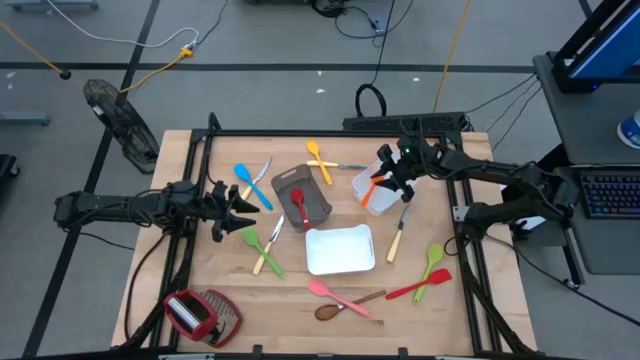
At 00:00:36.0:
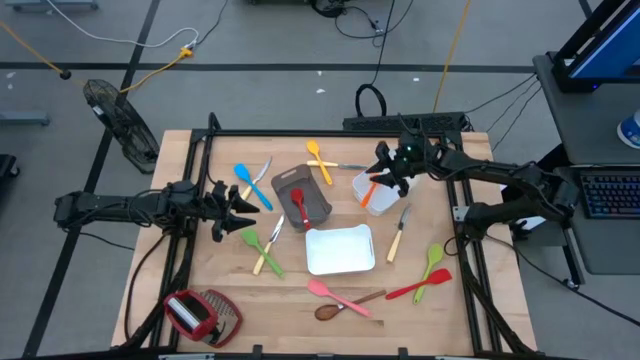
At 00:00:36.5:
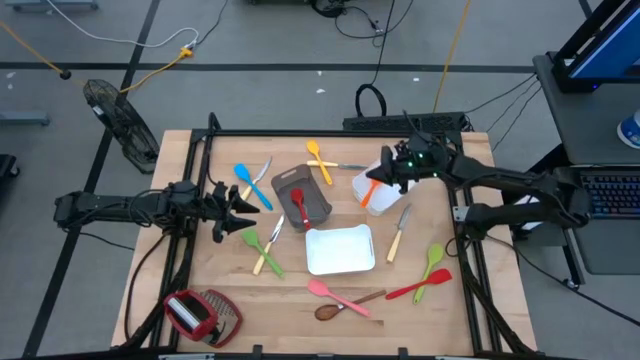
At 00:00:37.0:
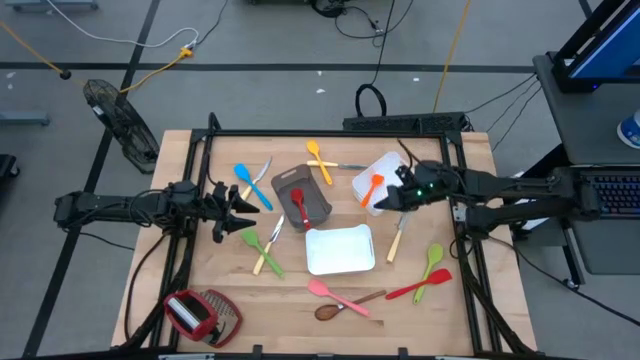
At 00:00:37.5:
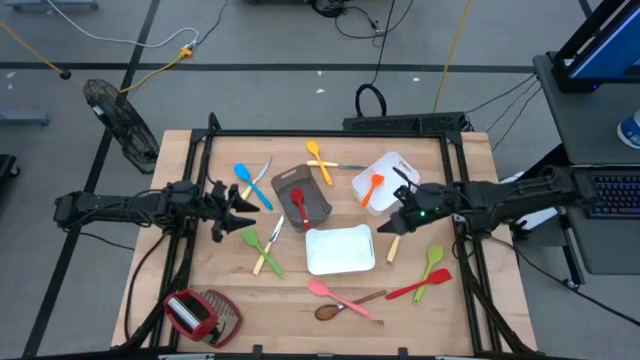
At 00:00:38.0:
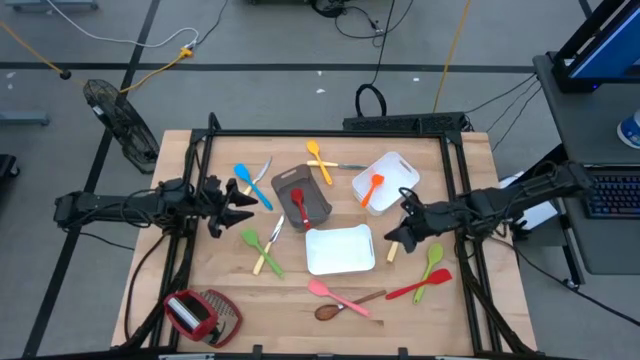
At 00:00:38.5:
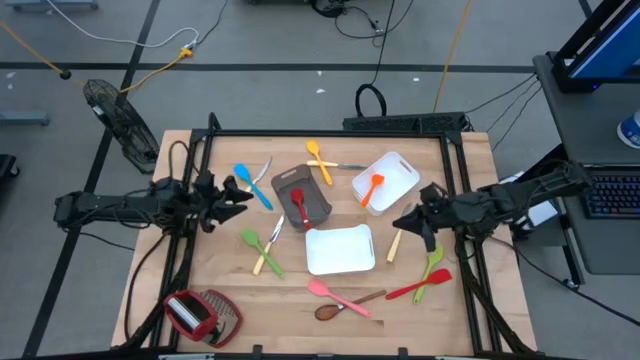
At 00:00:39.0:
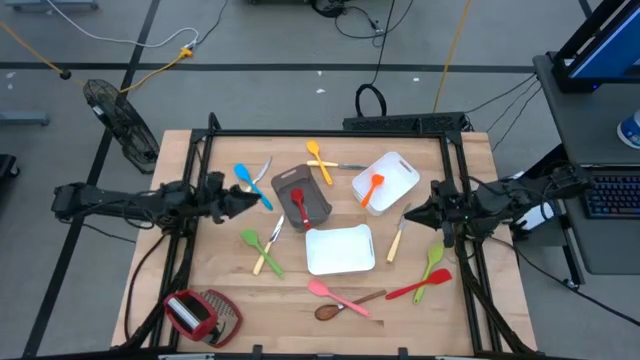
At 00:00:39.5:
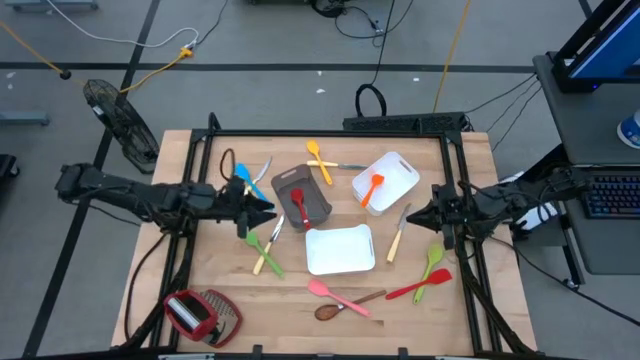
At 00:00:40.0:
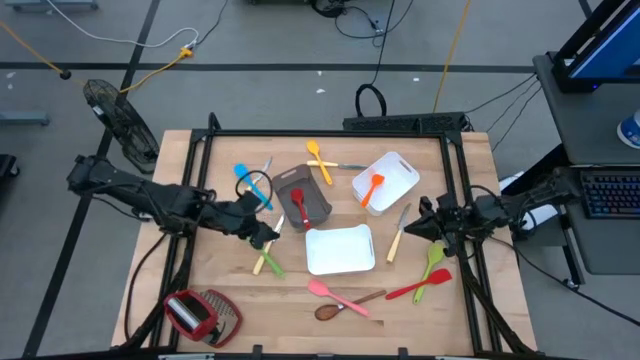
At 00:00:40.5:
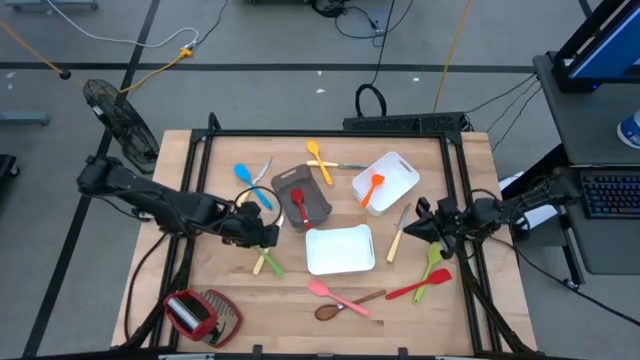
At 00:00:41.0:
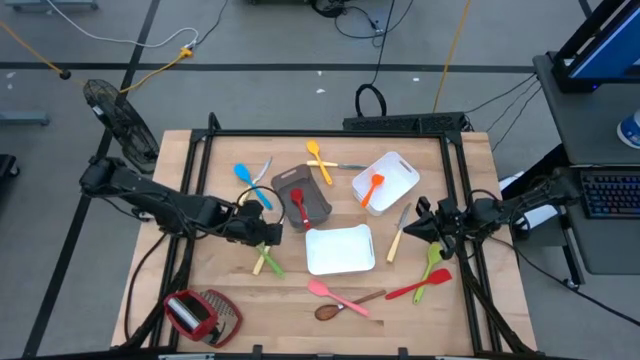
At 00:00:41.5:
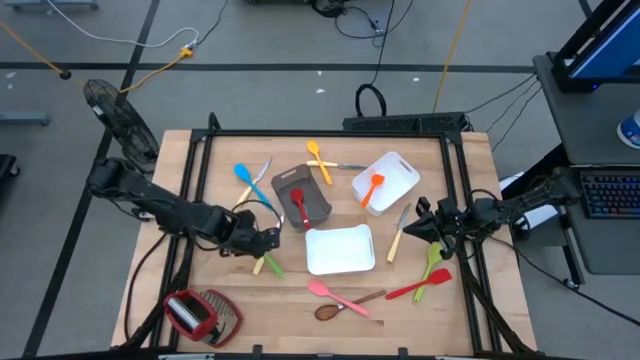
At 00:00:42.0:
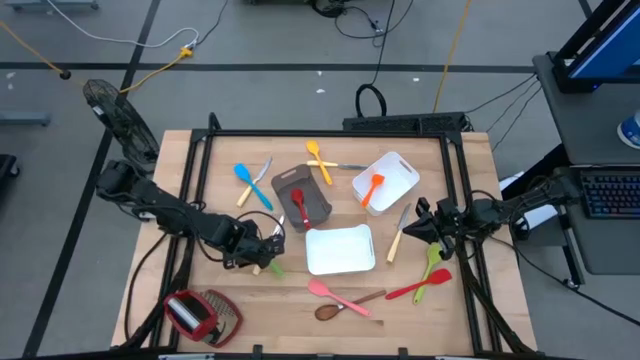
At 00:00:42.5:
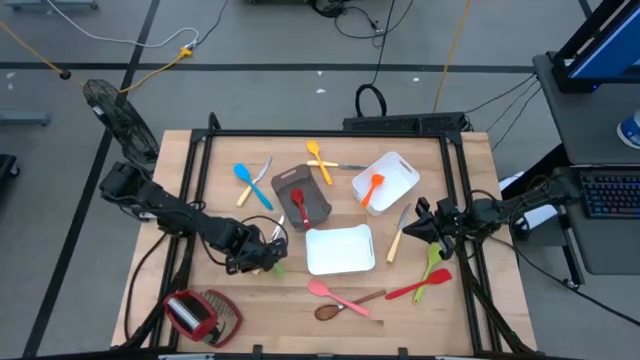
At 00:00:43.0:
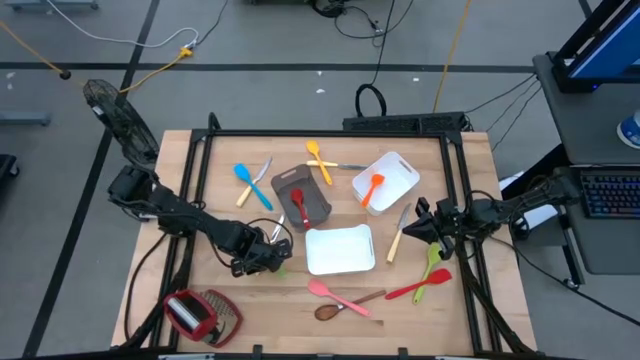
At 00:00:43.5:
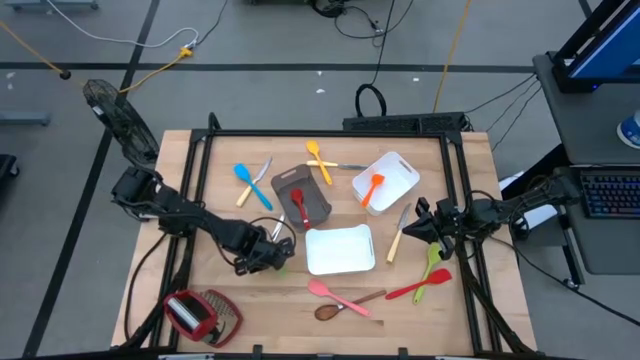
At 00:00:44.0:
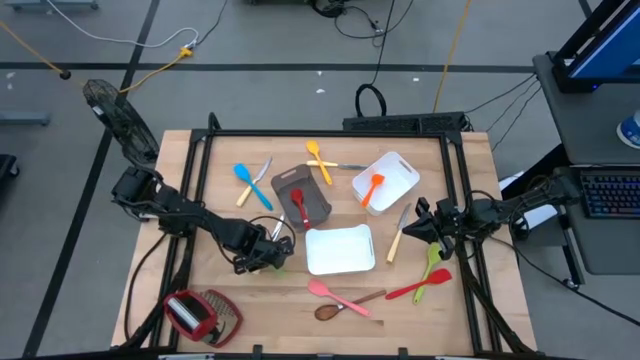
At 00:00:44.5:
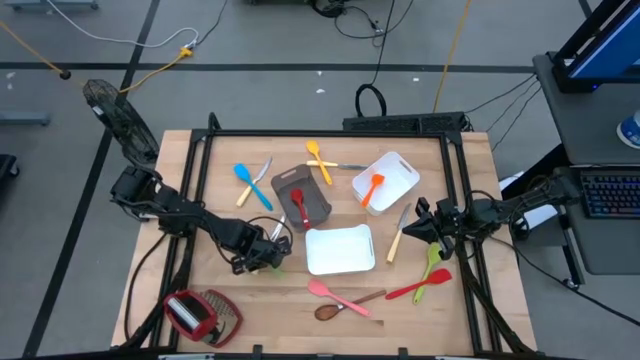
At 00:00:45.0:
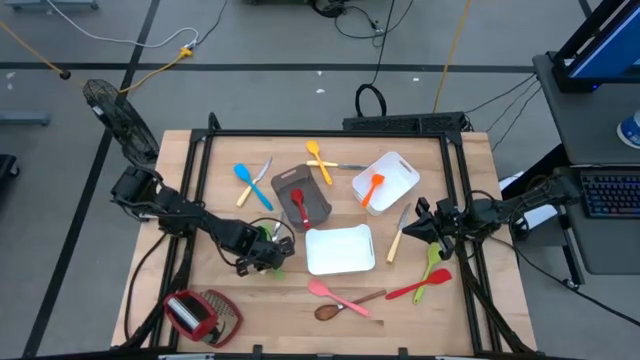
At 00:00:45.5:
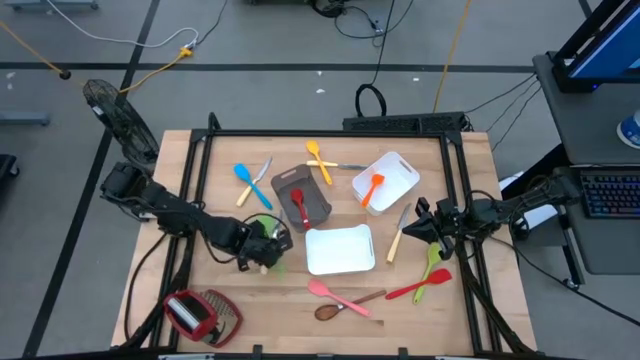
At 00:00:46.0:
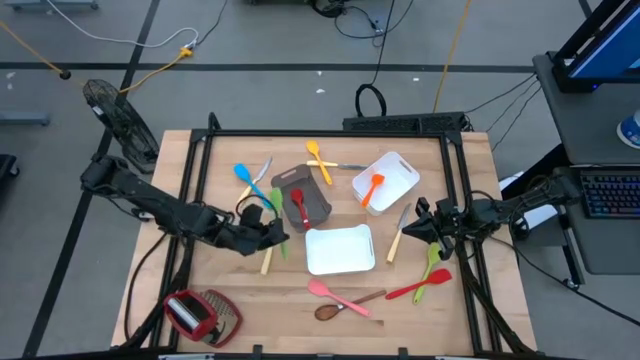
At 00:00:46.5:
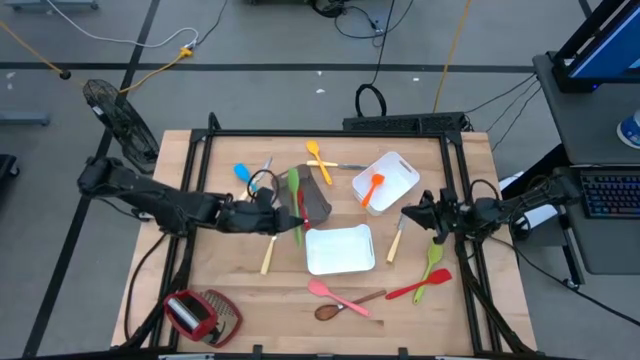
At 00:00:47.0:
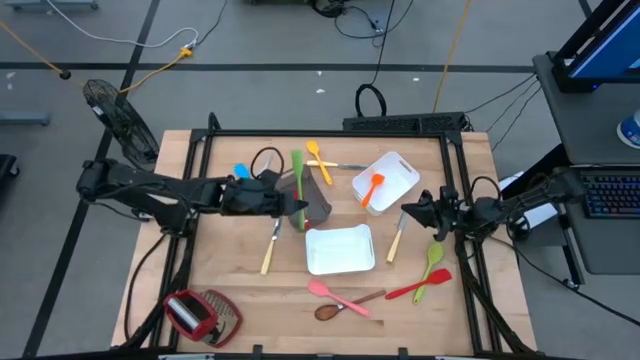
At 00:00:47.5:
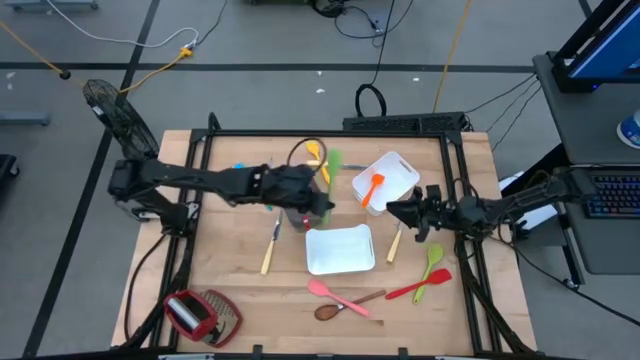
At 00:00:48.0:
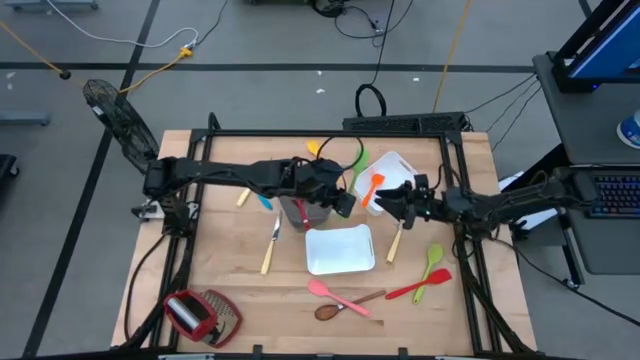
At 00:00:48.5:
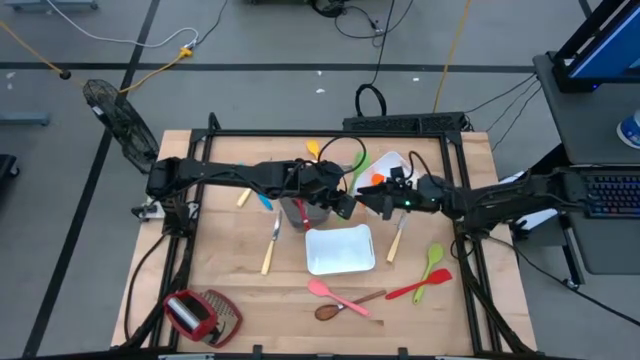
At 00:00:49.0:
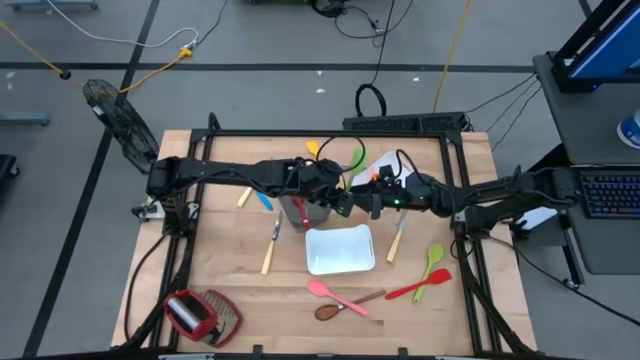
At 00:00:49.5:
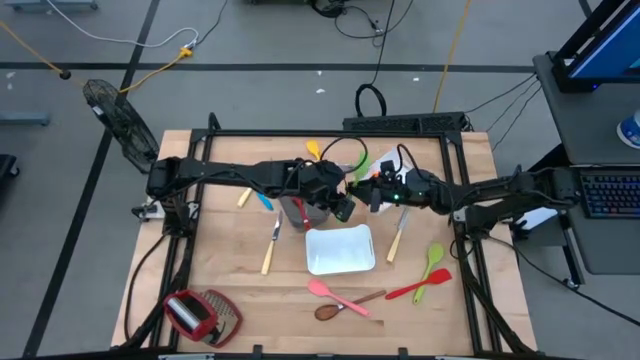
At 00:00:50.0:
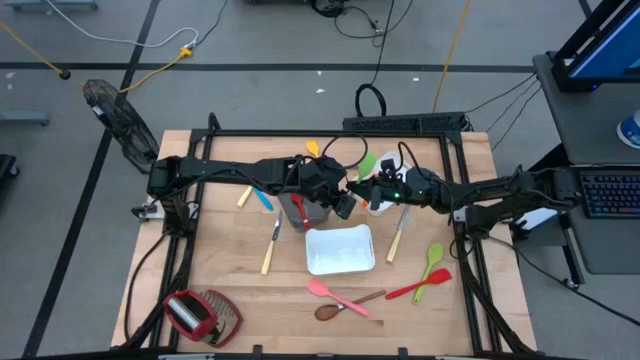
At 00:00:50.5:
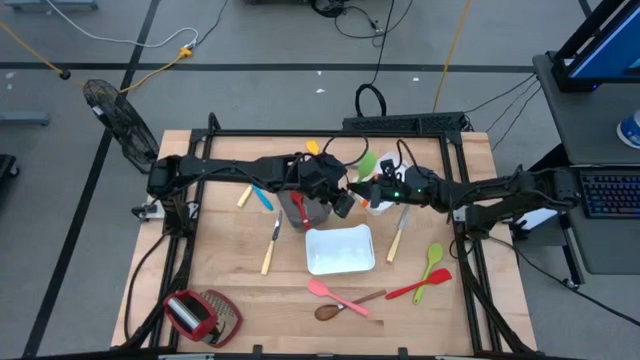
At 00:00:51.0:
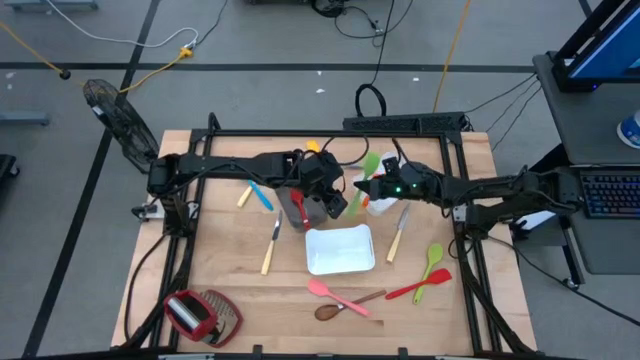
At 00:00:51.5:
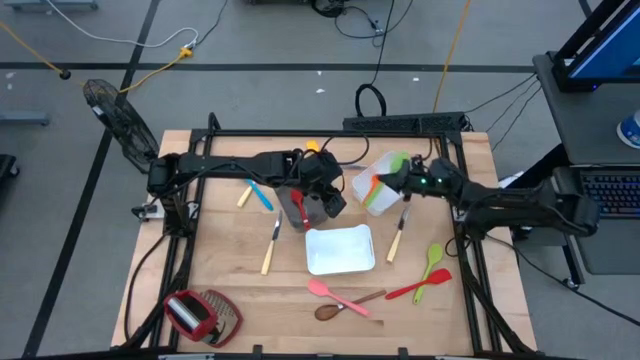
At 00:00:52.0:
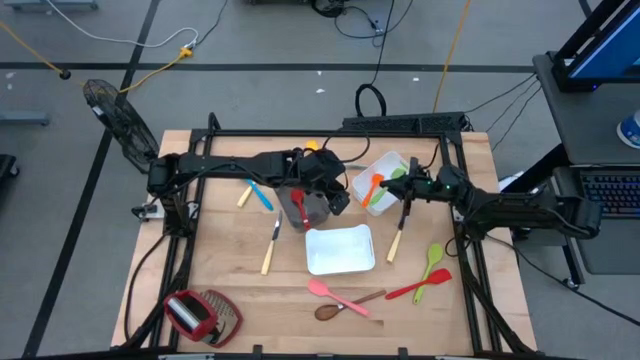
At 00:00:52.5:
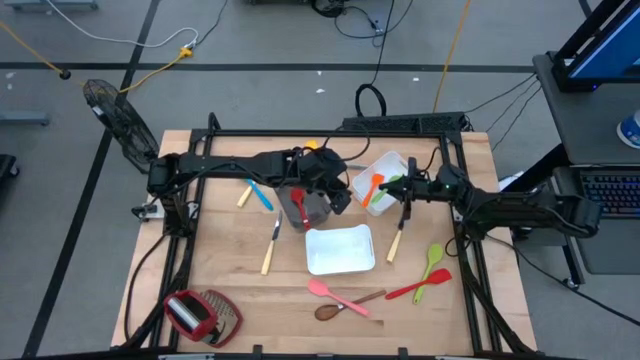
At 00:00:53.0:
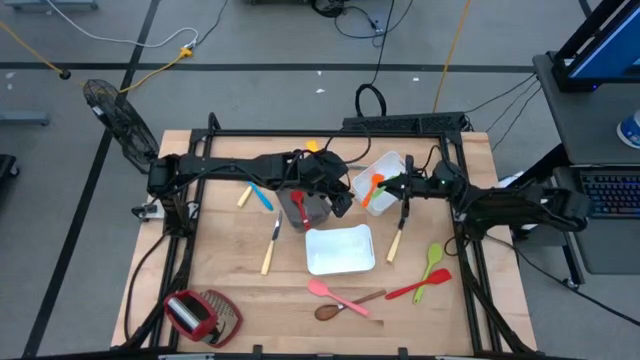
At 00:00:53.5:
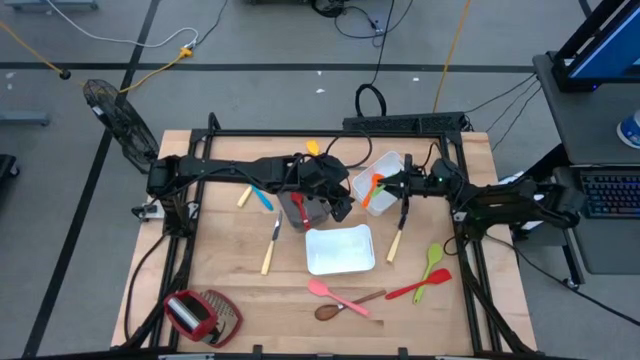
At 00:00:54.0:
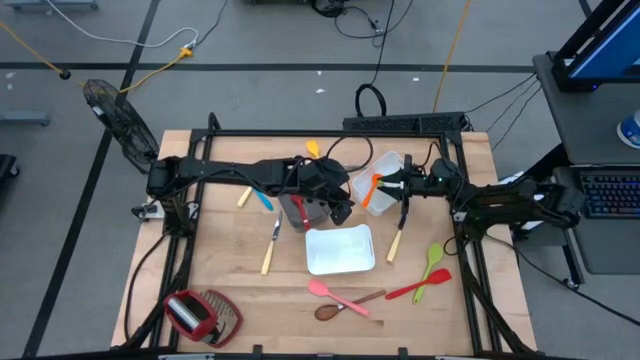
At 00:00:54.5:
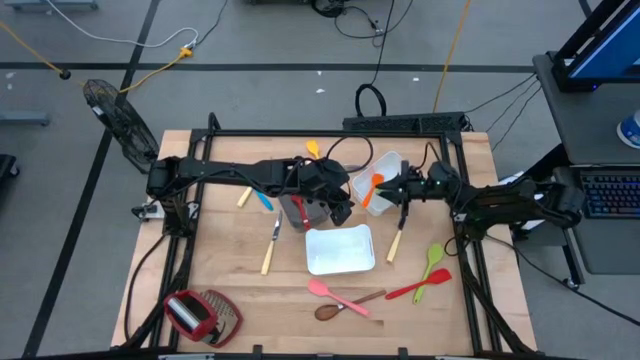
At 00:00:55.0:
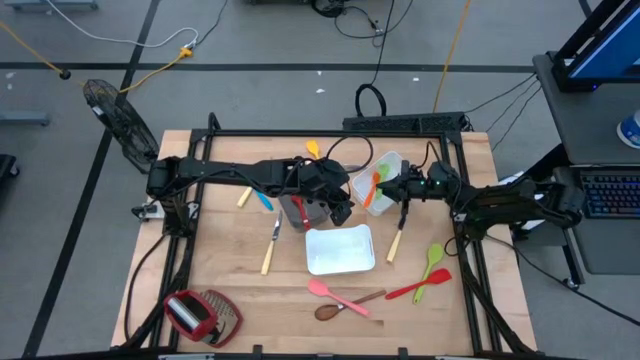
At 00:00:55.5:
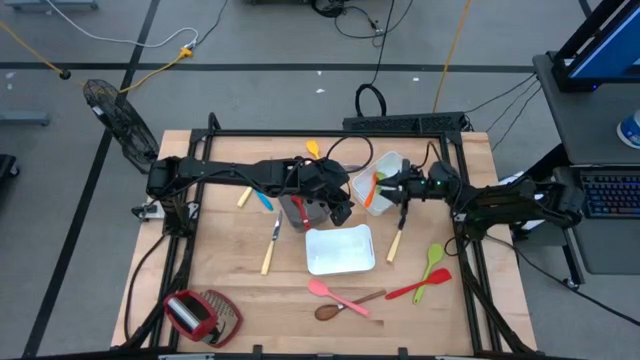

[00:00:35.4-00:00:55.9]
Task: Pick & Place Kitchen Items
Put the green spatula into the top white bin
